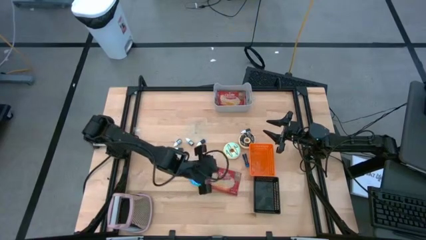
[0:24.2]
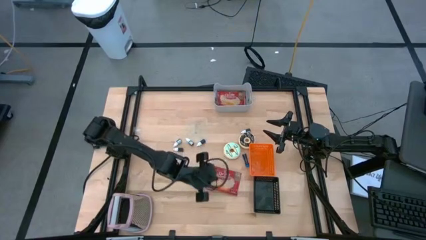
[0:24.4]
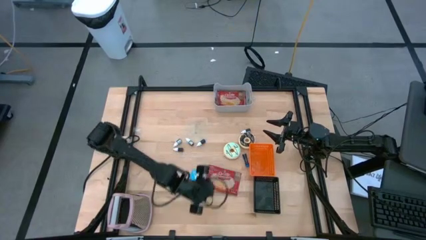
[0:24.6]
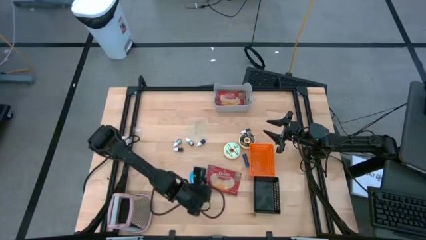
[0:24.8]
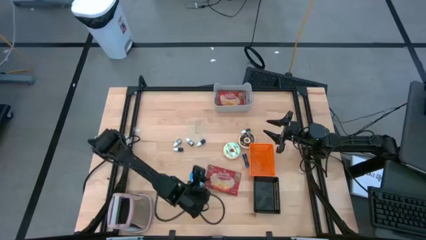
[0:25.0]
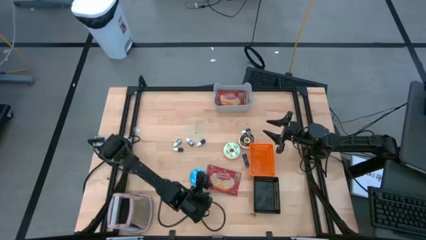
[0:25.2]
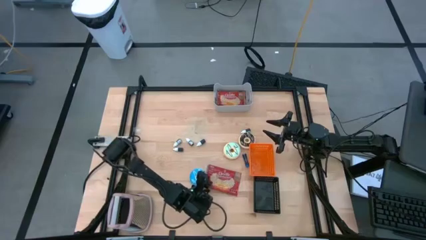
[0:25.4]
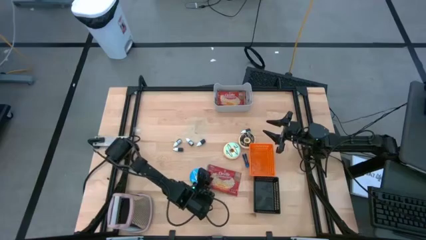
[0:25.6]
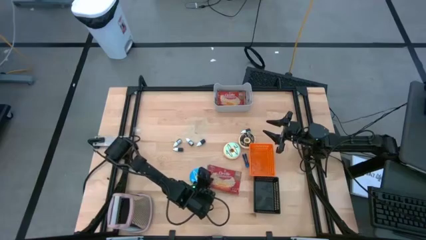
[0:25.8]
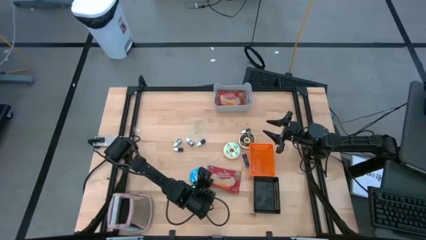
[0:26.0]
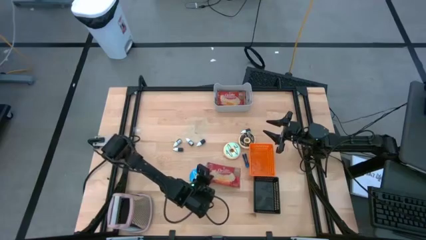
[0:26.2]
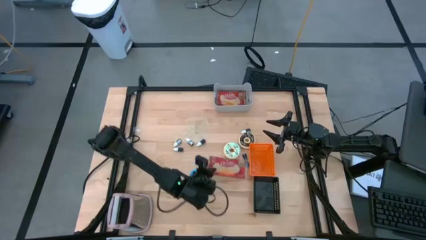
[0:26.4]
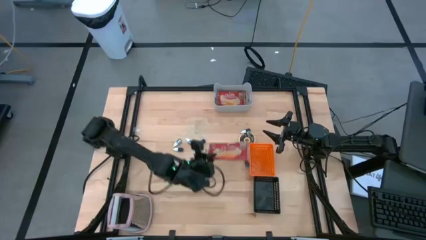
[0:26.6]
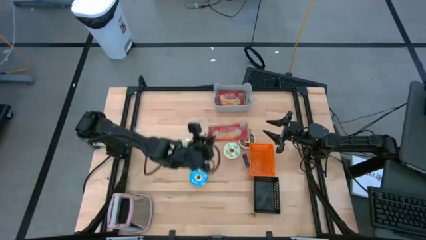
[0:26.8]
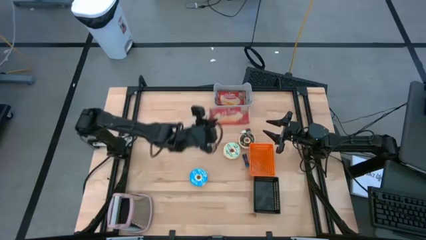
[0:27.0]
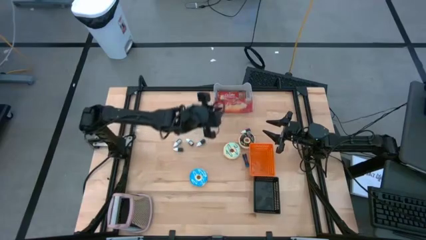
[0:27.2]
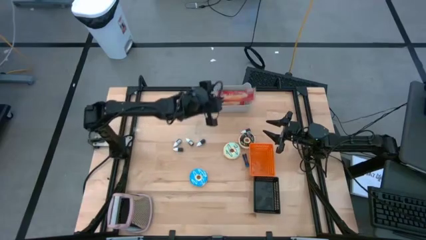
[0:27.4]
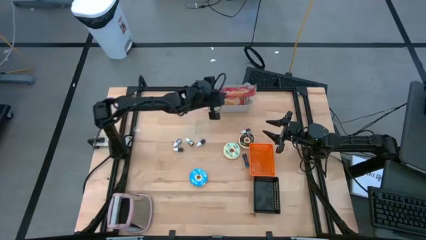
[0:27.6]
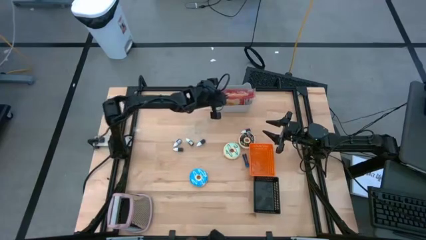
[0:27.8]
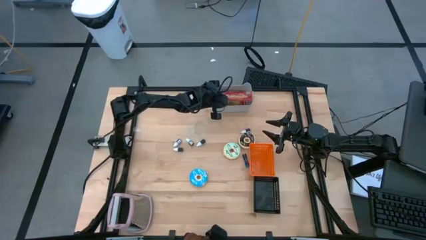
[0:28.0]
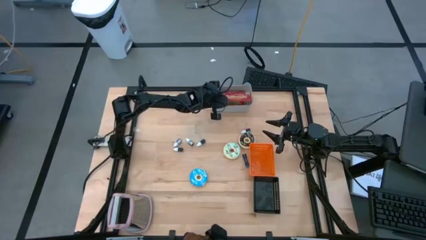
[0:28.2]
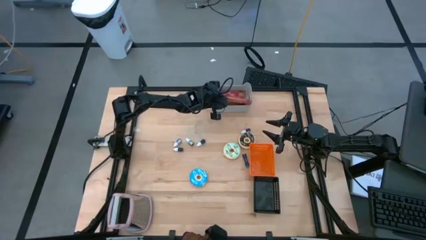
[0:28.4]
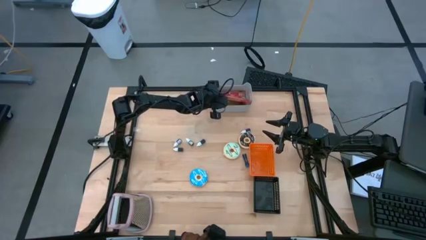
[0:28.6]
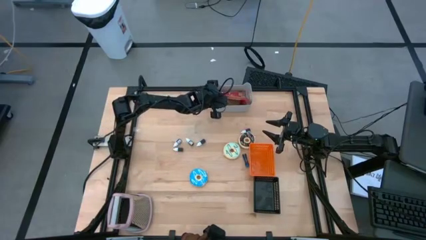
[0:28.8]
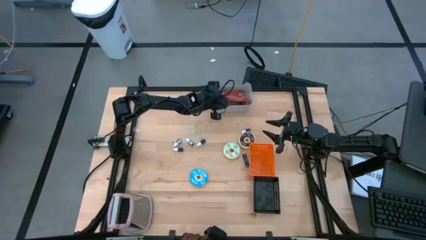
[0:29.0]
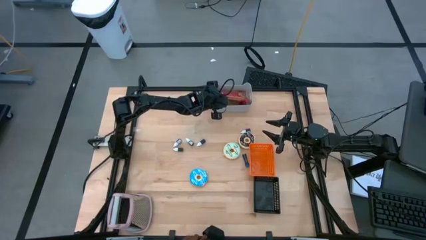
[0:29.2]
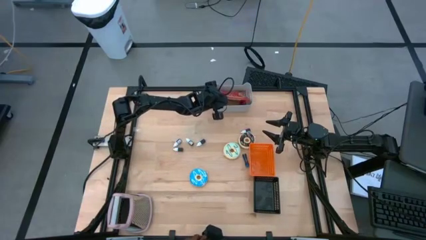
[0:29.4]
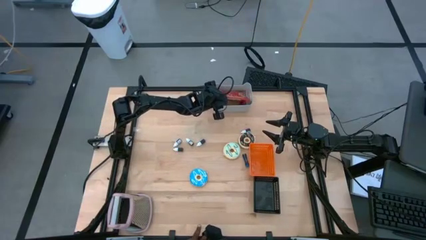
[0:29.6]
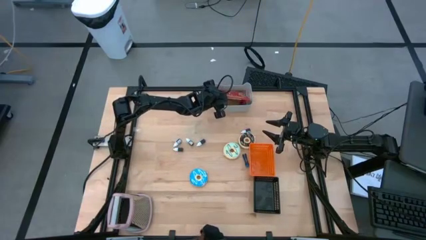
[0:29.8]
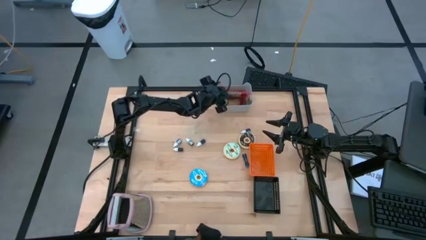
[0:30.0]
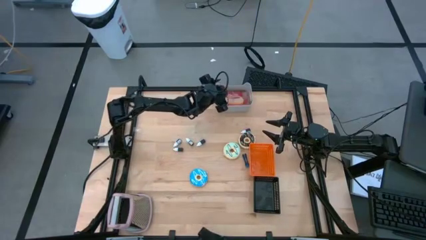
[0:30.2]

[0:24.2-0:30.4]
Stack the popcorn bag into the gray bin

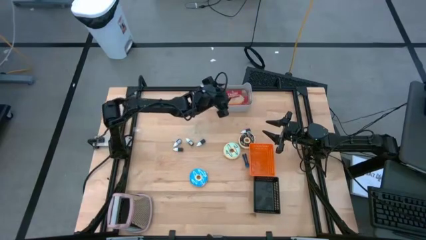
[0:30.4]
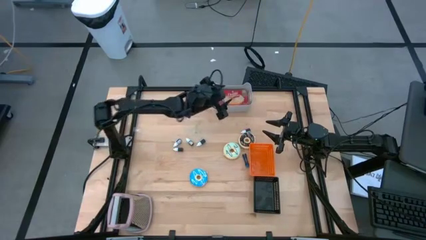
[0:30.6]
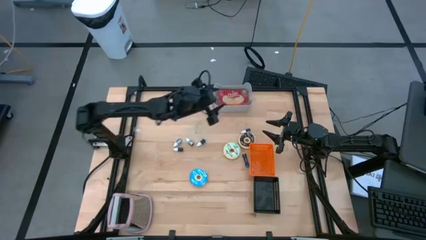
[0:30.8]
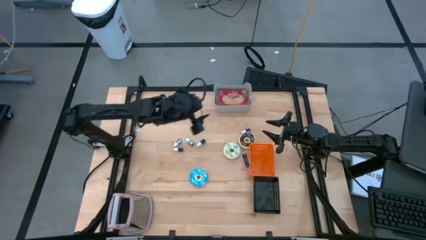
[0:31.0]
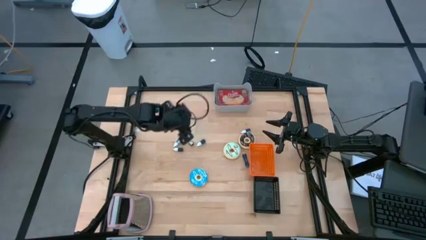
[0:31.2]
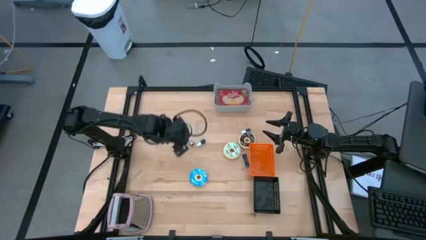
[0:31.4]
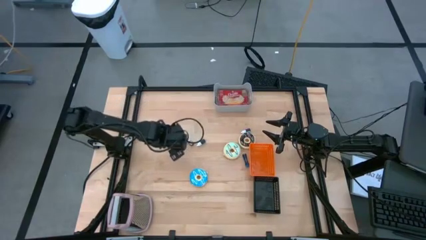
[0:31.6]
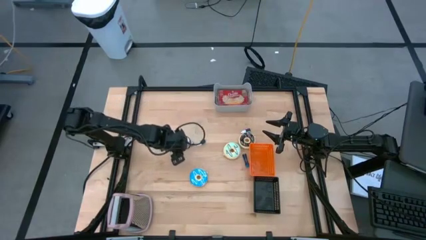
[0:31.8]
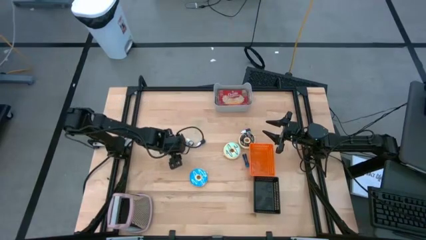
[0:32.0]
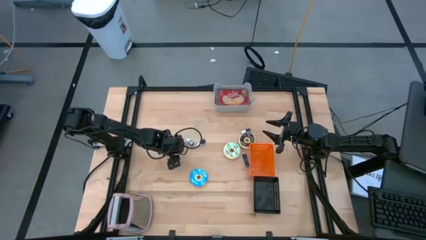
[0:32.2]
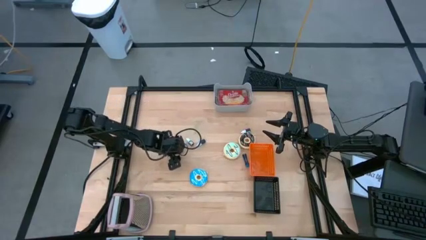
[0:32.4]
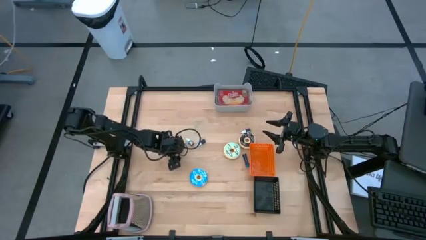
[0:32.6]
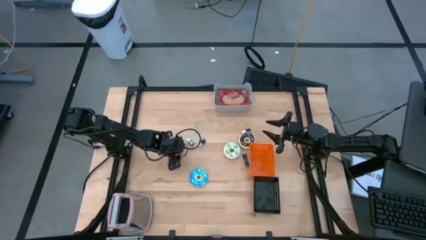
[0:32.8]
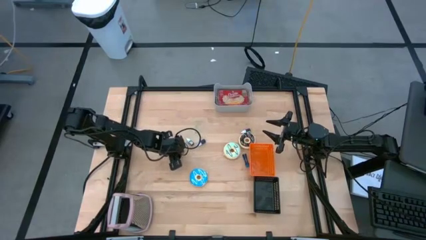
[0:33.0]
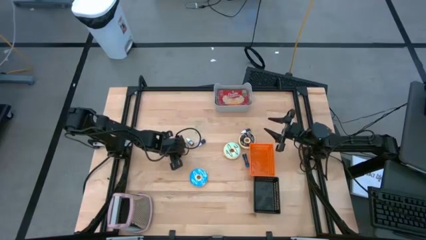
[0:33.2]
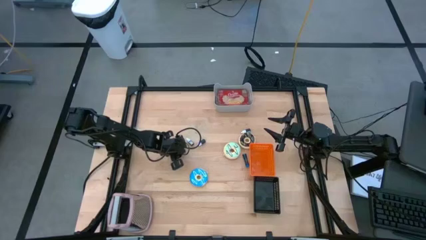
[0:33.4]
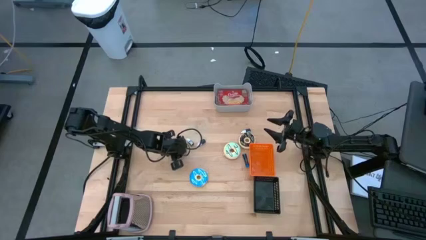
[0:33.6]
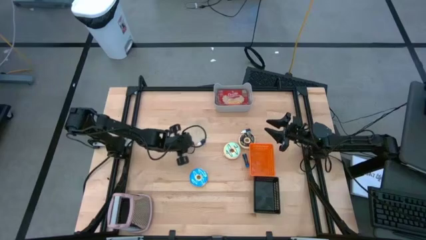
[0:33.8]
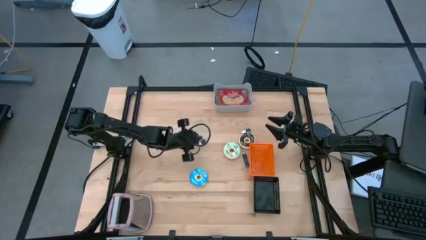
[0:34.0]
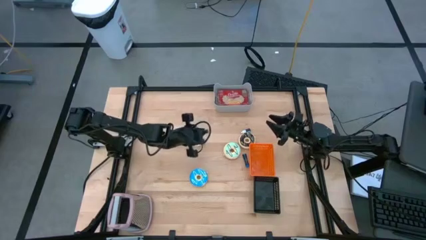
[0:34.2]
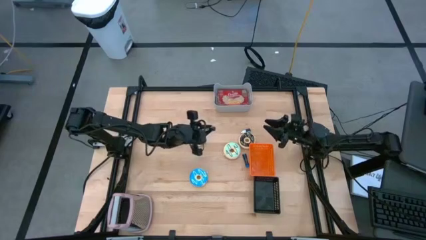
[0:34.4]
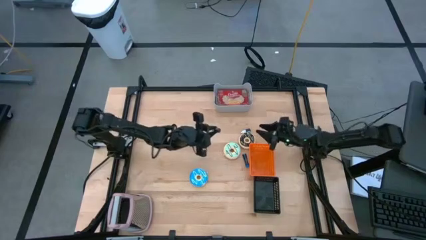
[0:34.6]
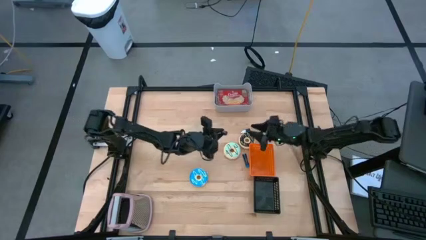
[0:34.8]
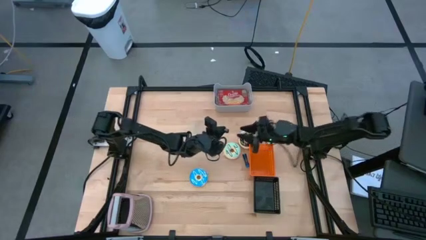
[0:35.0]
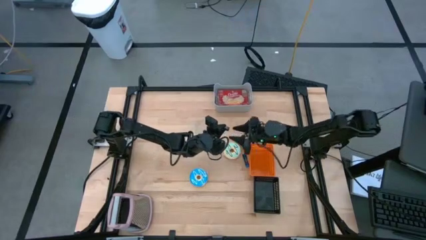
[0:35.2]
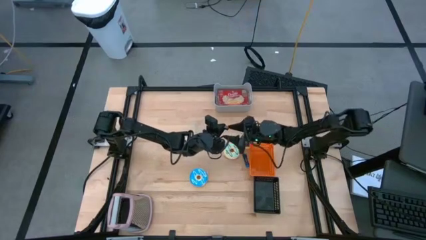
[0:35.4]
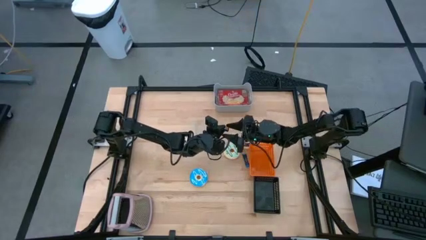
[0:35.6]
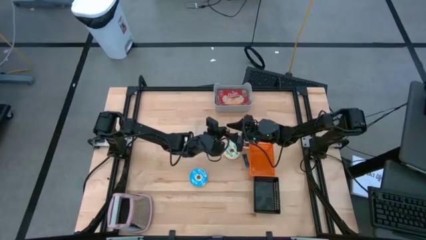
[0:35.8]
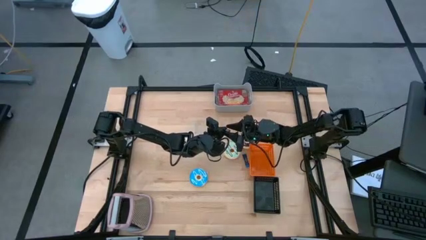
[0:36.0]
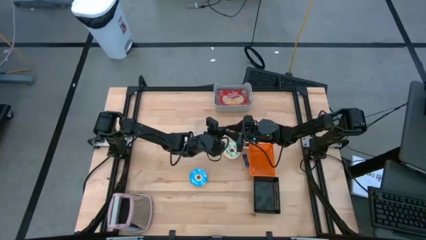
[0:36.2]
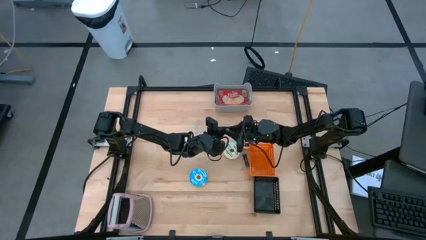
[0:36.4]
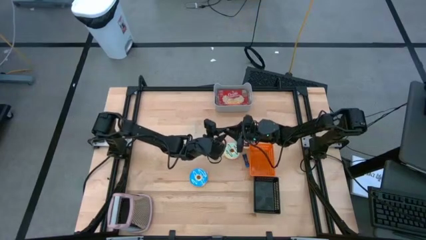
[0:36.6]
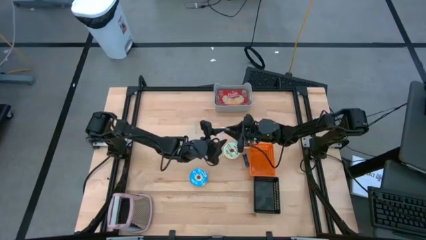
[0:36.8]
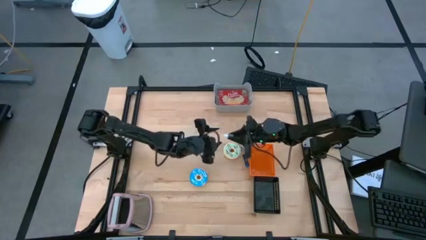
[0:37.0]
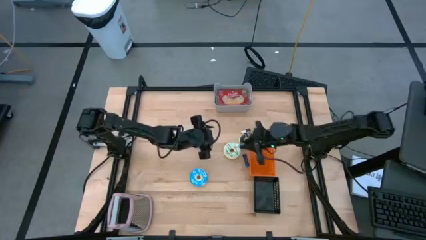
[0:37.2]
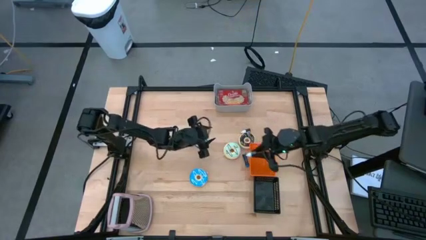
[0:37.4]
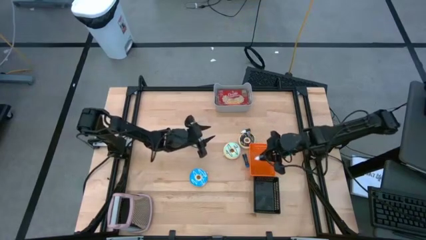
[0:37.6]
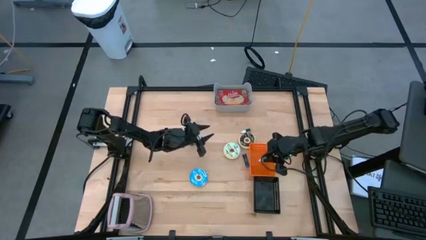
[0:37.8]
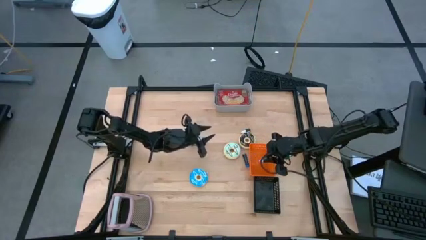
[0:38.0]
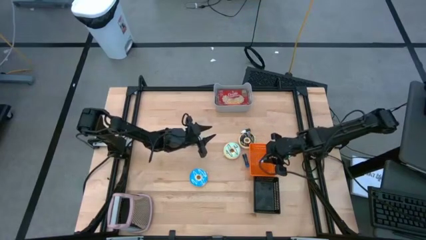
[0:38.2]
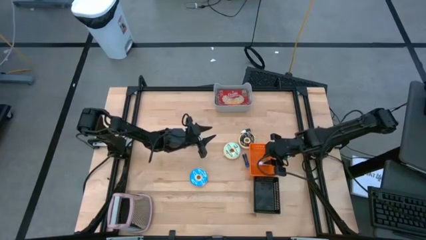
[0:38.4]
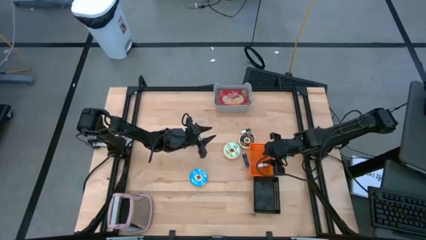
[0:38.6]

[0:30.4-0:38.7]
Put the black food coloring bottle into the orange bin
